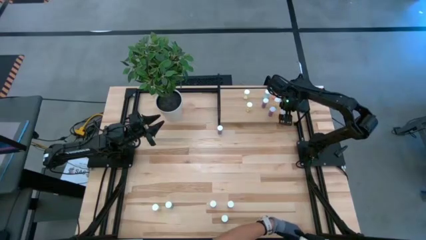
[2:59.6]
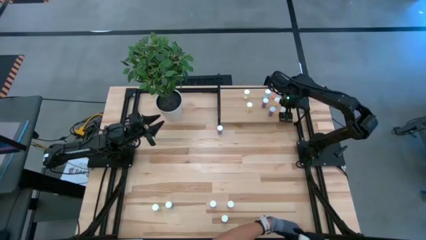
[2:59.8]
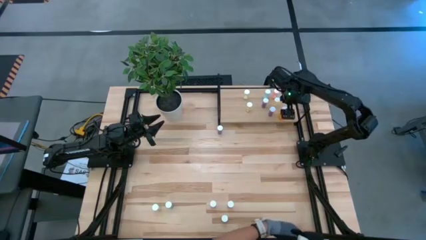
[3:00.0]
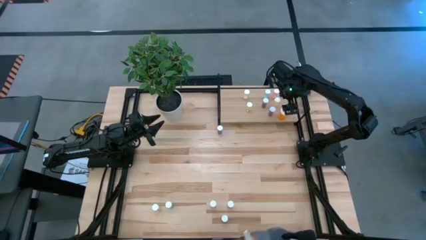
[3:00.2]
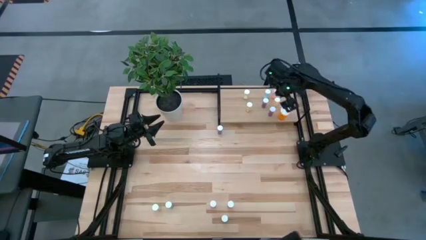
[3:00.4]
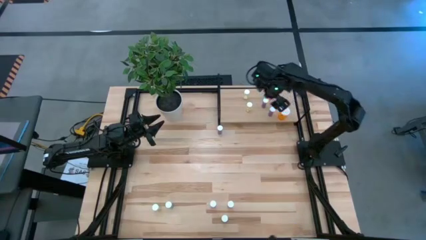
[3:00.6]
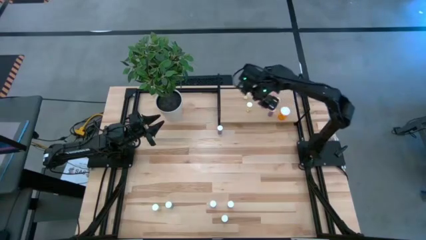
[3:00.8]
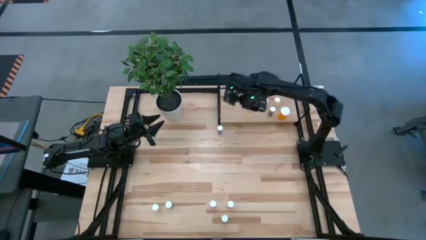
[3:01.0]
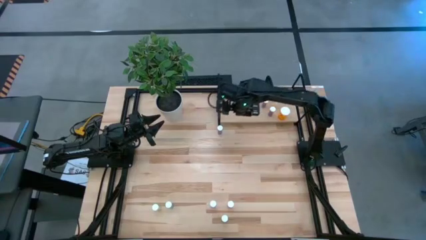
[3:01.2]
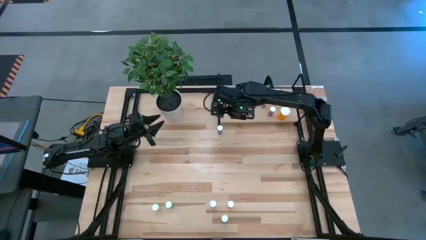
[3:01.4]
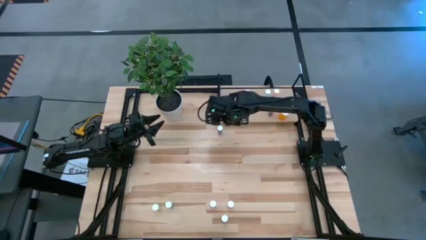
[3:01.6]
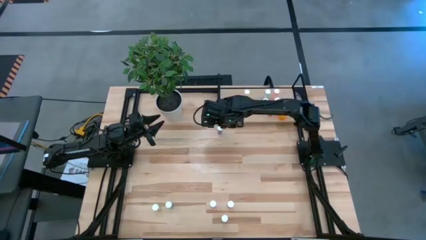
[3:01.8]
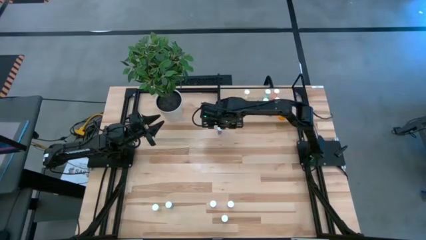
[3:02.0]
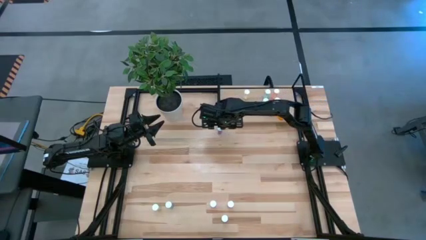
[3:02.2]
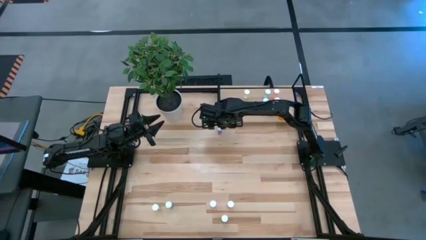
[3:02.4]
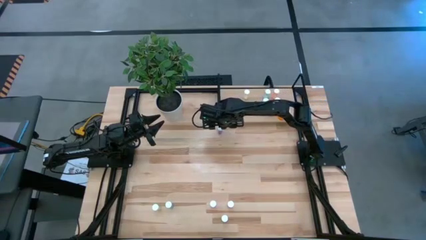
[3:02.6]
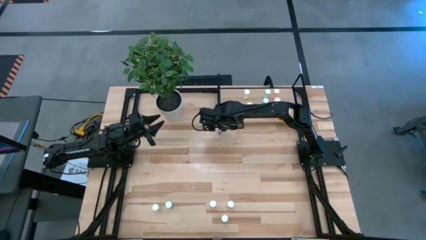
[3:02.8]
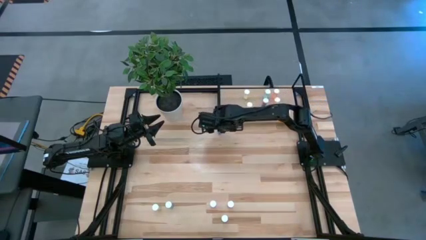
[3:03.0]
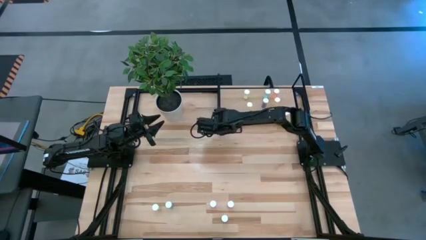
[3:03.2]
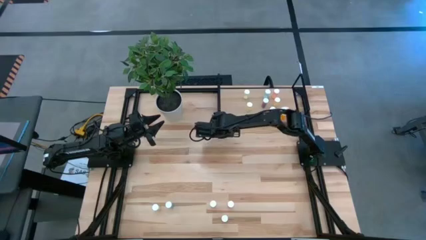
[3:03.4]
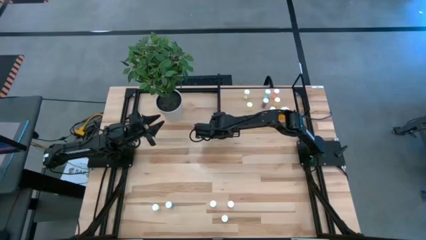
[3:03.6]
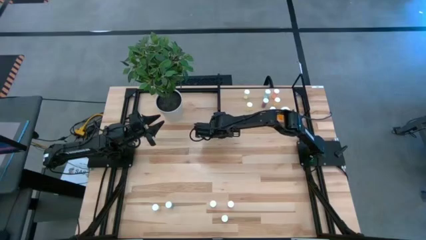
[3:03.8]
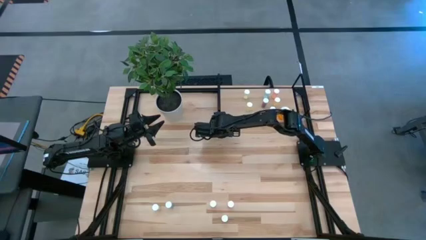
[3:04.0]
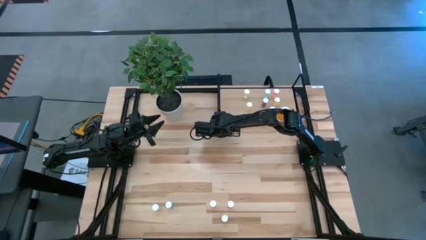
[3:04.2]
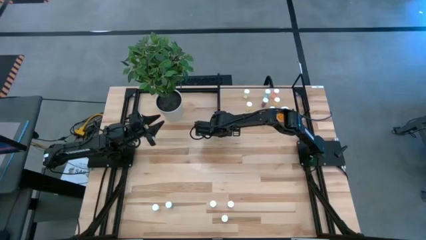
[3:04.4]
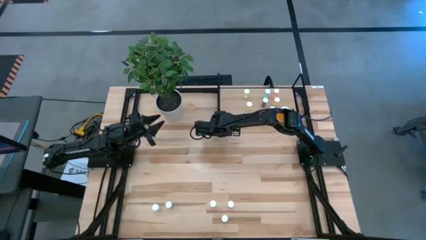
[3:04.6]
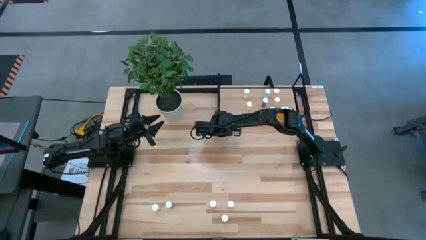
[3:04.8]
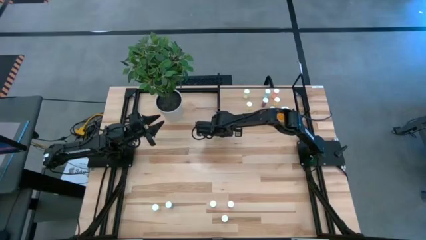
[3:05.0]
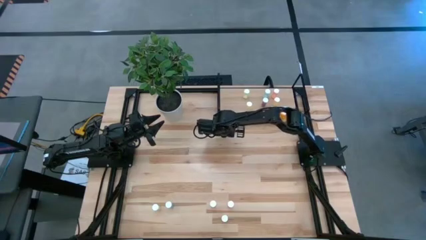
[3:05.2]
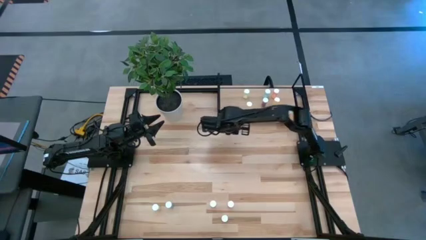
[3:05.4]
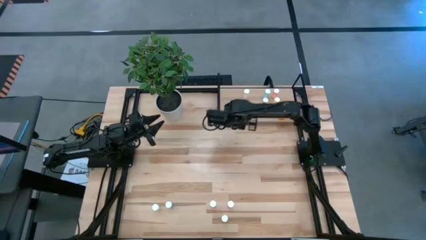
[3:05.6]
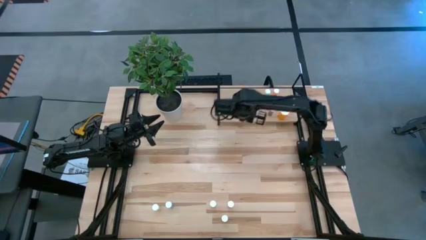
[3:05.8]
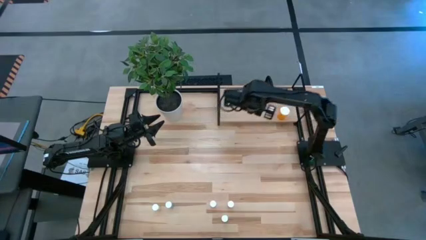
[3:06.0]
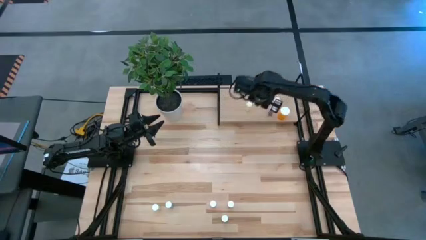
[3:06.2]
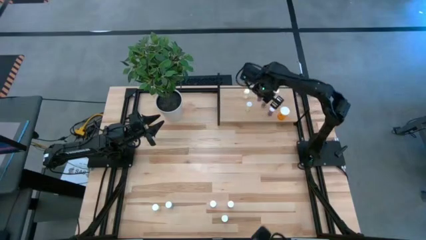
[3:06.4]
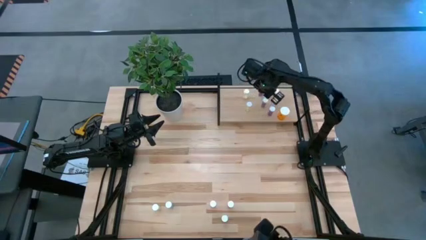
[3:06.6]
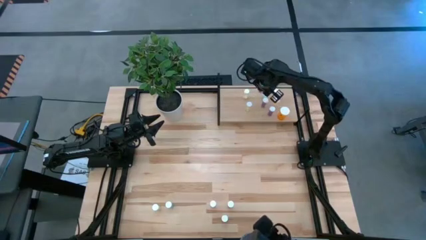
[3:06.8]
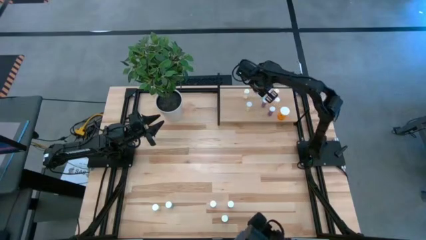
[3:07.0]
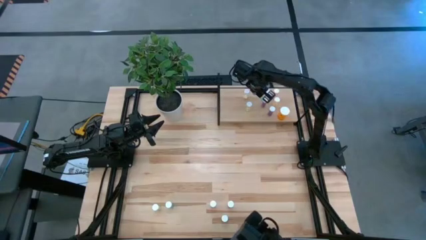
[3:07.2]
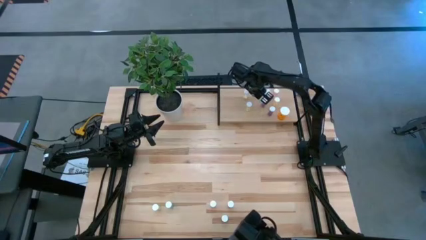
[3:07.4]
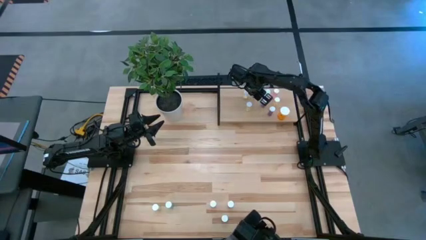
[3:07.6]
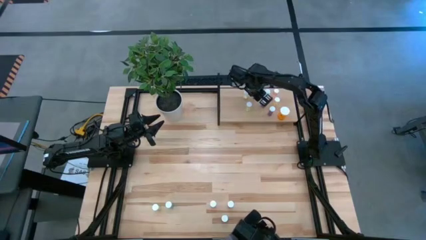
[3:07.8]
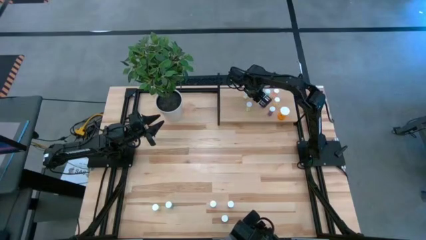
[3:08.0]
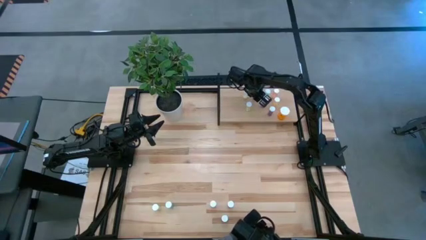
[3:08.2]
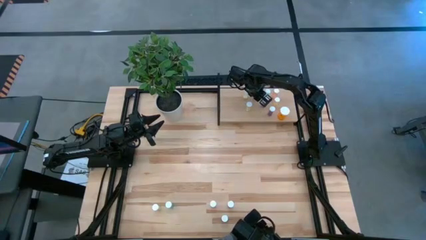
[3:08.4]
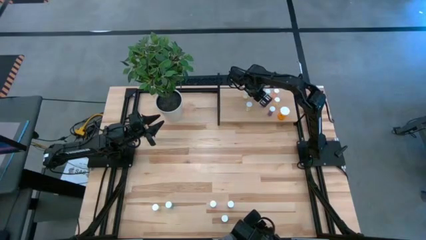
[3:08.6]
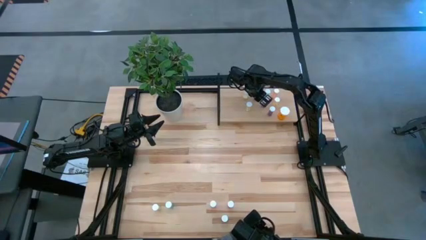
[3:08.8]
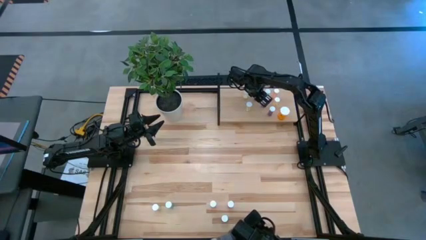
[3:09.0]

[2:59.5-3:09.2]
Task: Pick and place medicine bottles onto shelf by color
Put the top blue pill bottle on the shelf

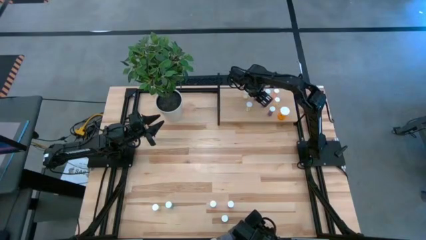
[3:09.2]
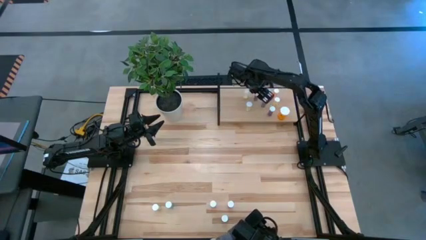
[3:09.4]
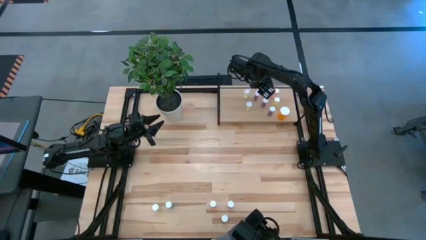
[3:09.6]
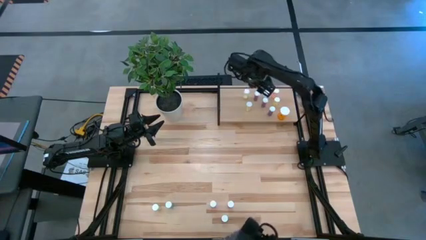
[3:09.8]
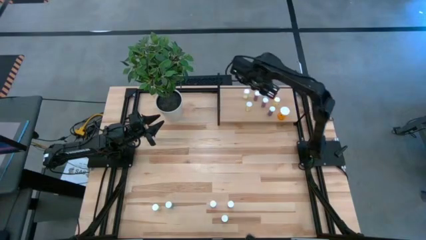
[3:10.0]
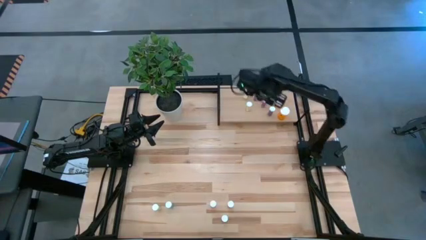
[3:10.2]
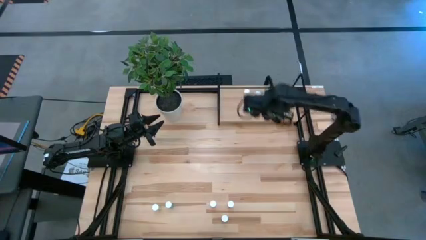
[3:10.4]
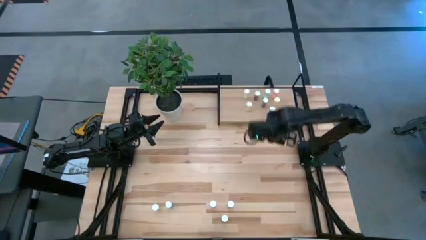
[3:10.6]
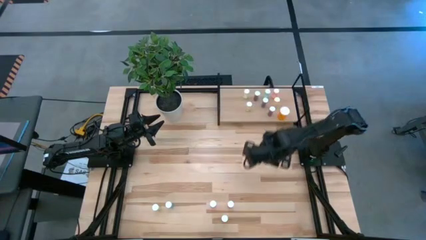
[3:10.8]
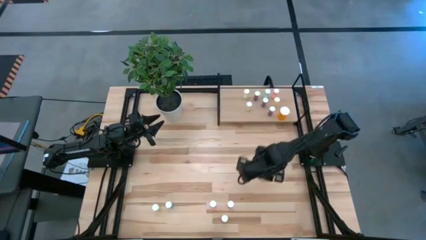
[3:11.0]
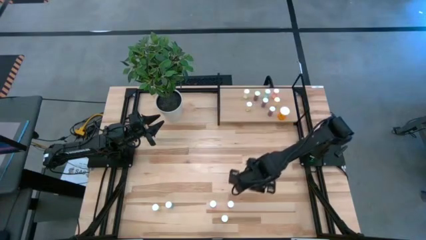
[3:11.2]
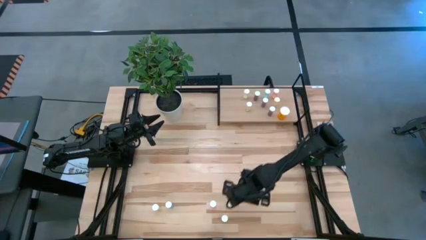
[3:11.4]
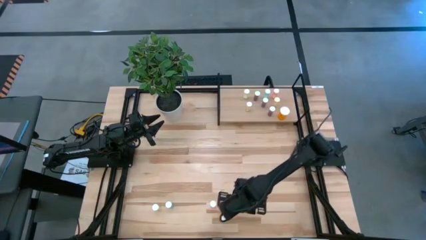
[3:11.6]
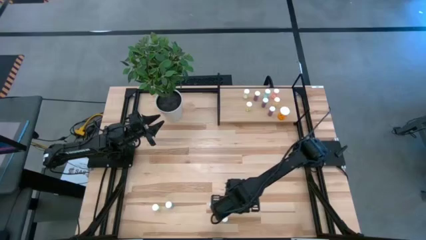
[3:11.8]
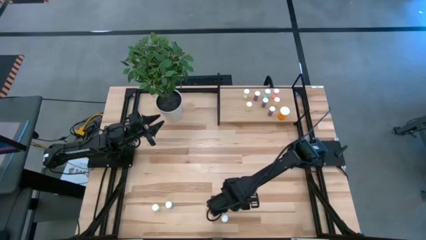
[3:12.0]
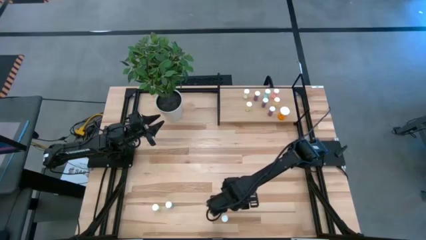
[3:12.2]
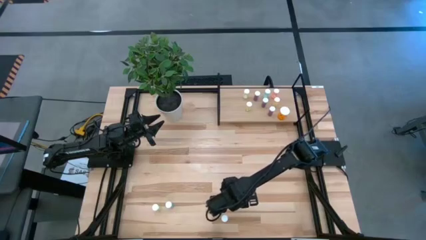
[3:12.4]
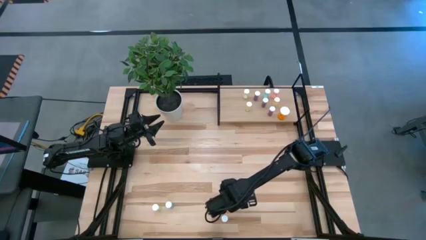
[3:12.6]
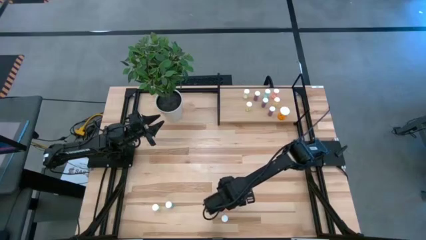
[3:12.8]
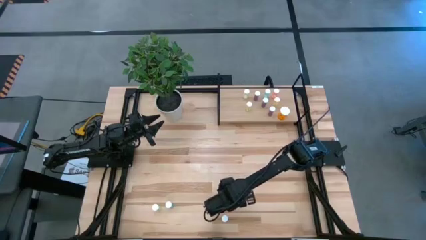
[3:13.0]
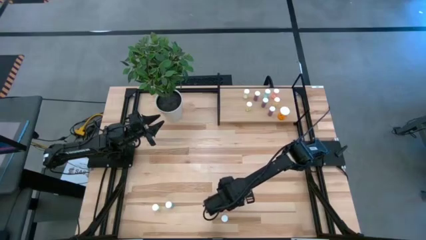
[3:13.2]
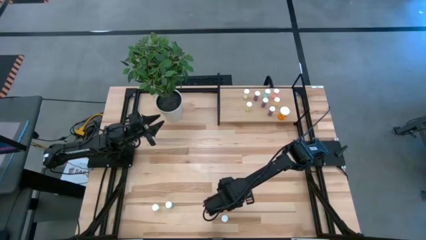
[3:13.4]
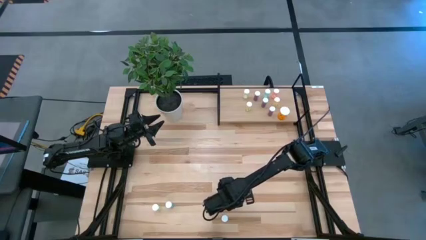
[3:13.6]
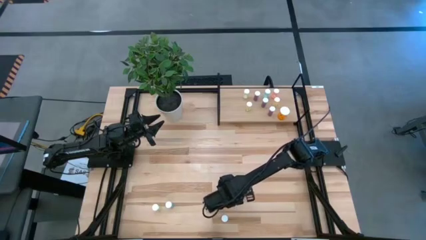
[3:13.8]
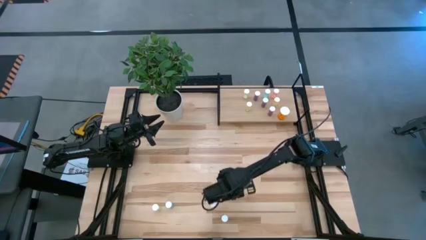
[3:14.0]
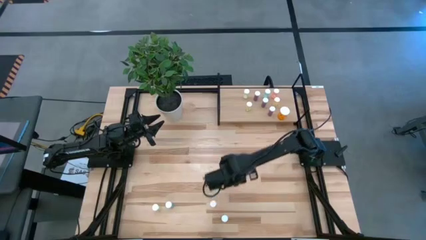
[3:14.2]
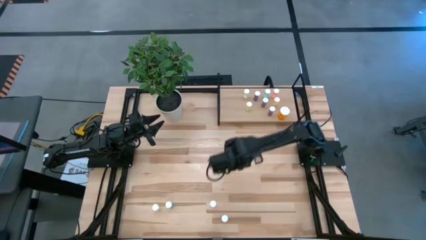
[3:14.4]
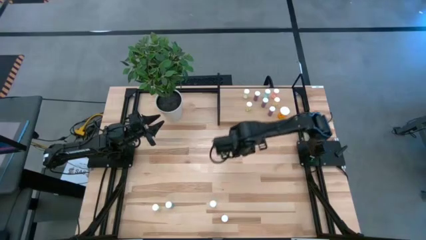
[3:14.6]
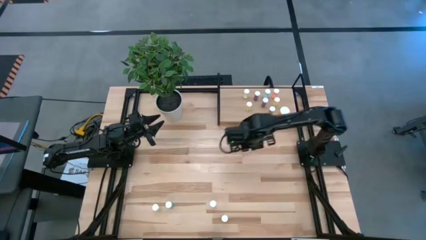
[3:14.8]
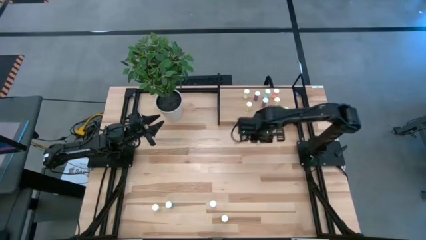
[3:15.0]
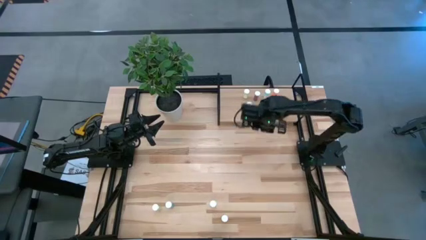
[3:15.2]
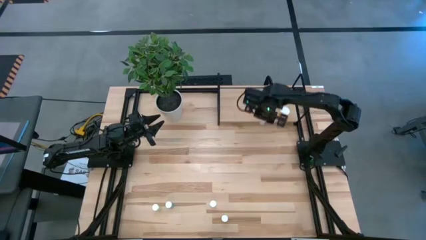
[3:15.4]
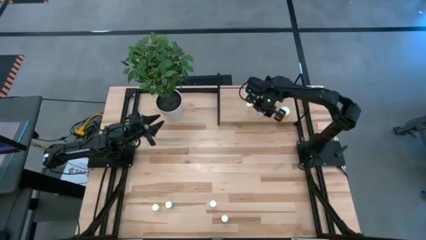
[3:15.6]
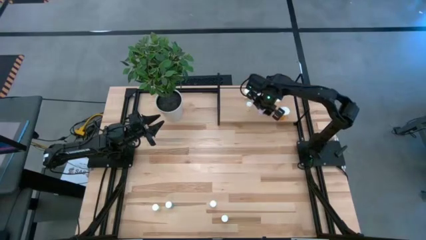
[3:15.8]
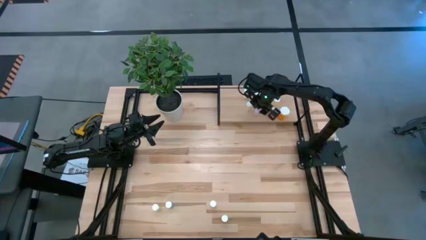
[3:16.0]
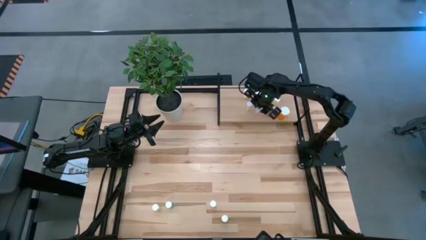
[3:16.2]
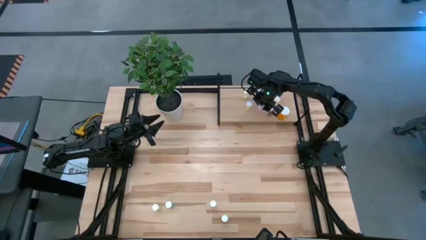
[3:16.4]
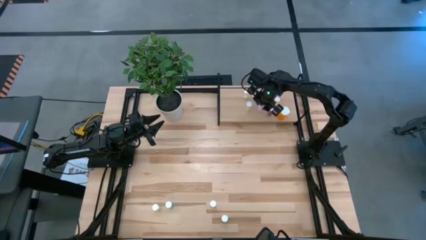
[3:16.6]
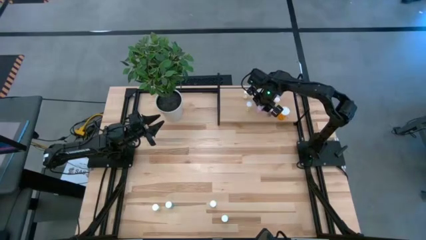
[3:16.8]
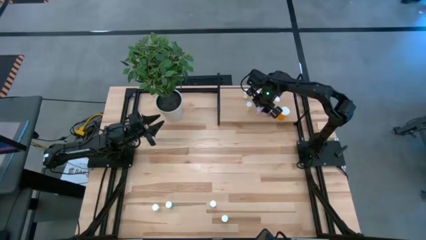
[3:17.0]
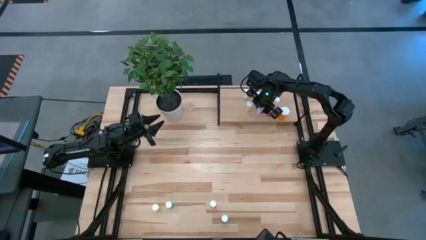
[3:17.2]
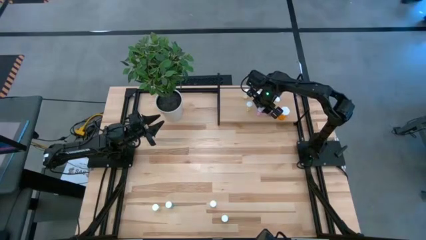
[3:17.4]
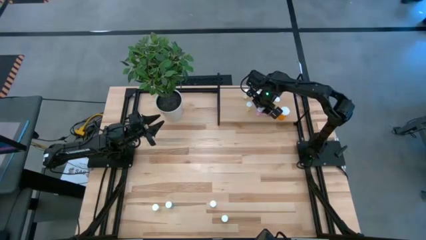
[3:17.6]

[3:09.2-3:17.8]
Put the right pink pill bottle on the shelf
